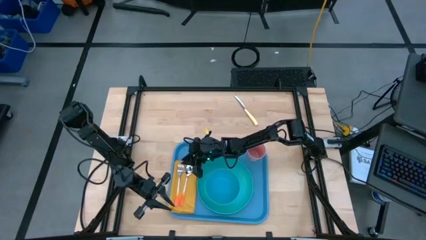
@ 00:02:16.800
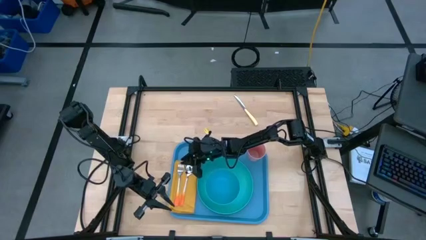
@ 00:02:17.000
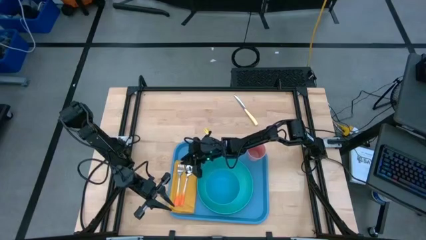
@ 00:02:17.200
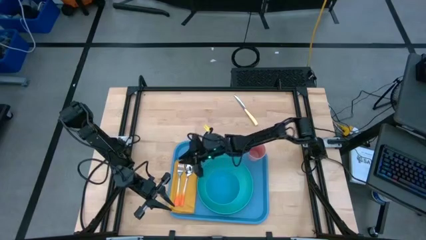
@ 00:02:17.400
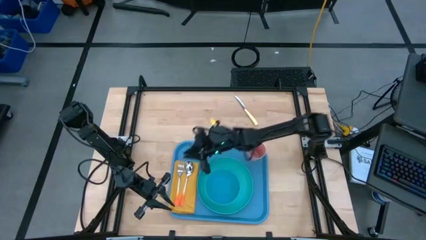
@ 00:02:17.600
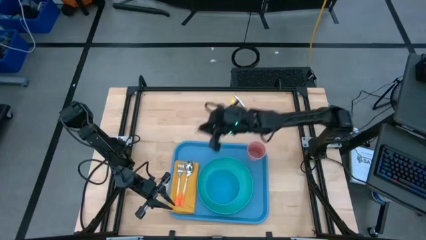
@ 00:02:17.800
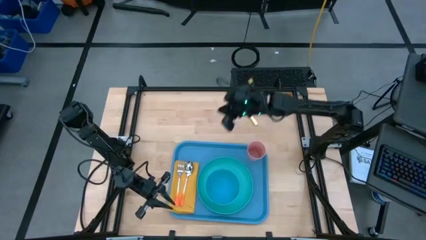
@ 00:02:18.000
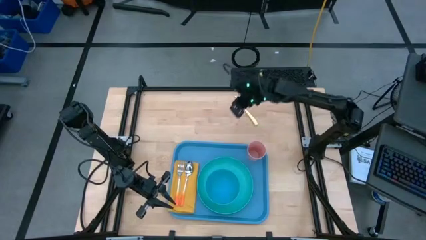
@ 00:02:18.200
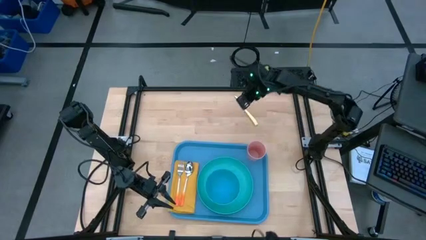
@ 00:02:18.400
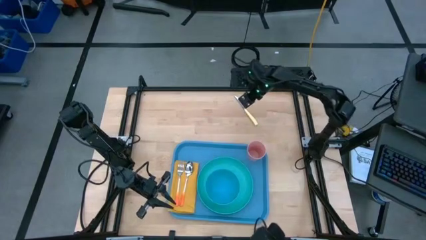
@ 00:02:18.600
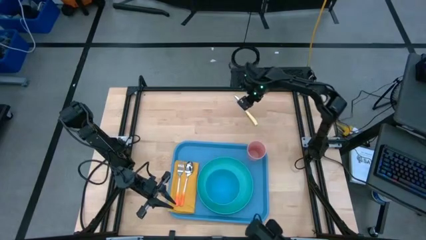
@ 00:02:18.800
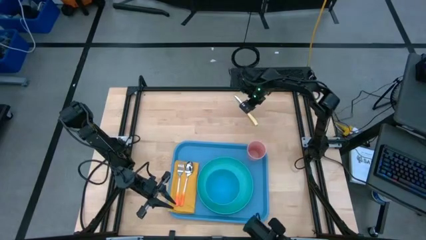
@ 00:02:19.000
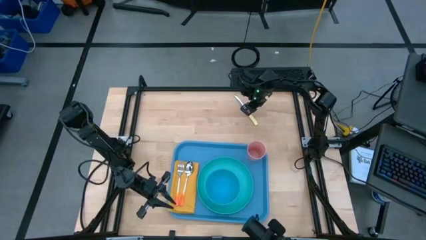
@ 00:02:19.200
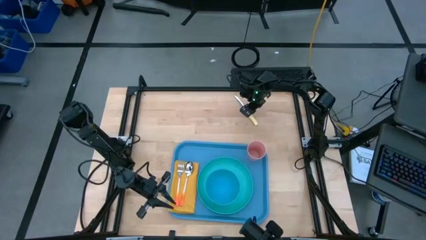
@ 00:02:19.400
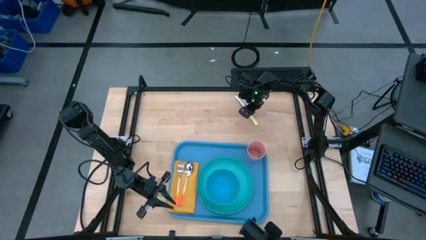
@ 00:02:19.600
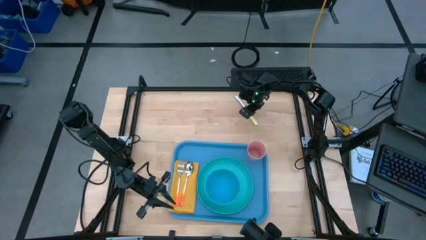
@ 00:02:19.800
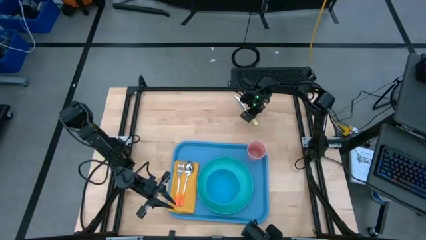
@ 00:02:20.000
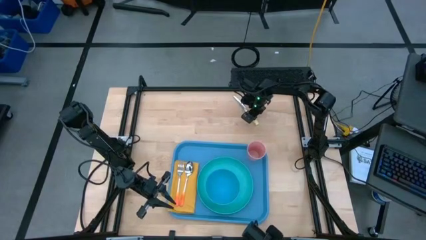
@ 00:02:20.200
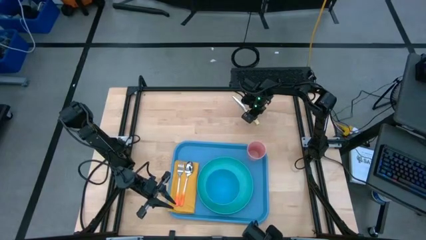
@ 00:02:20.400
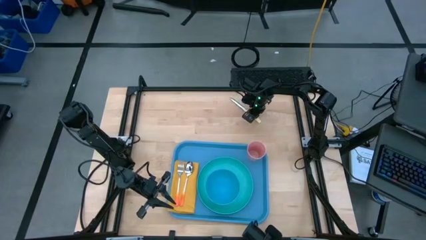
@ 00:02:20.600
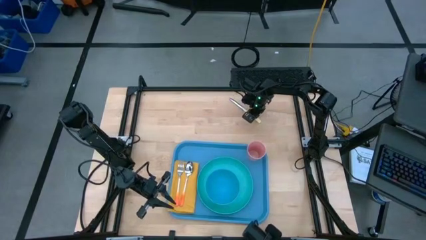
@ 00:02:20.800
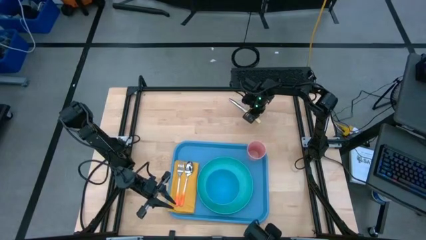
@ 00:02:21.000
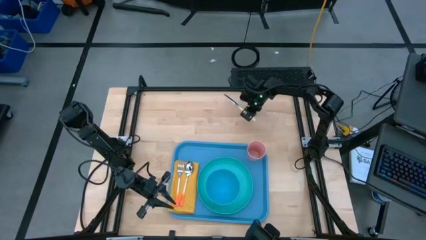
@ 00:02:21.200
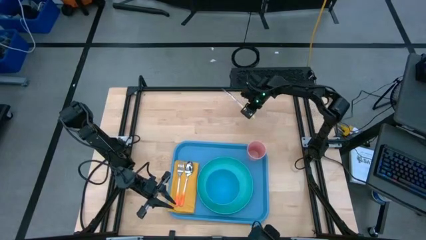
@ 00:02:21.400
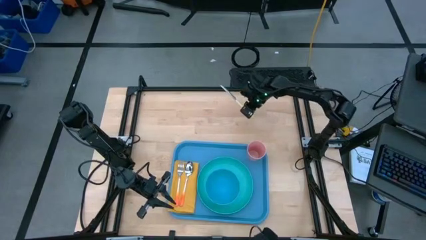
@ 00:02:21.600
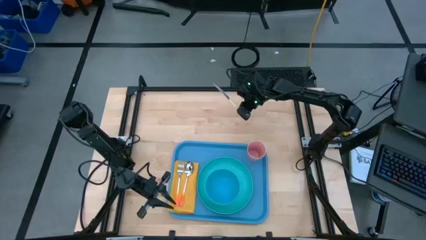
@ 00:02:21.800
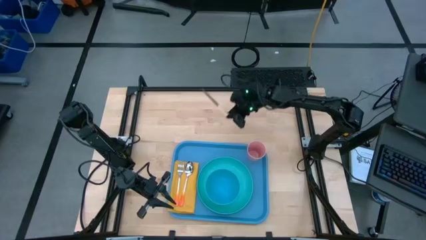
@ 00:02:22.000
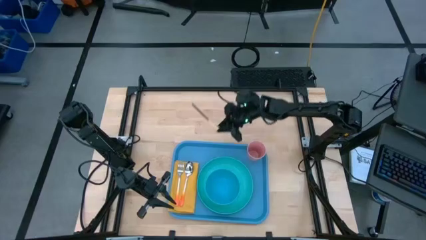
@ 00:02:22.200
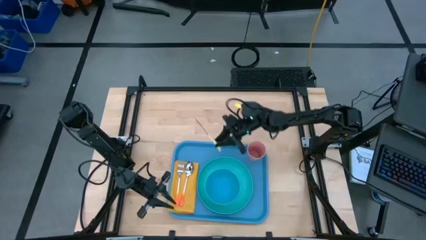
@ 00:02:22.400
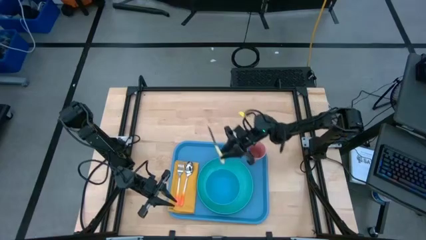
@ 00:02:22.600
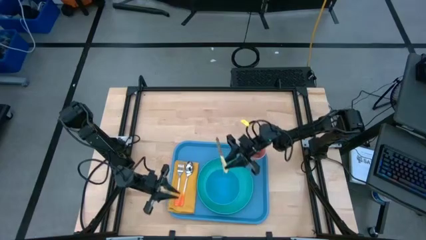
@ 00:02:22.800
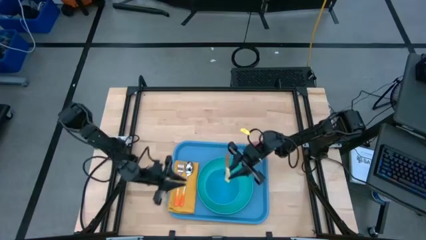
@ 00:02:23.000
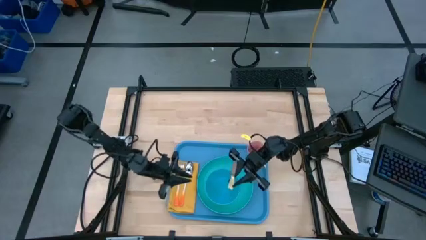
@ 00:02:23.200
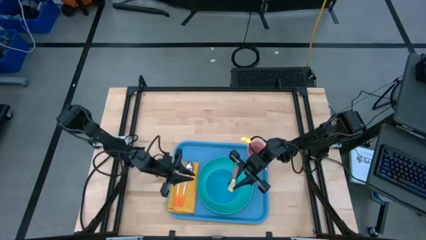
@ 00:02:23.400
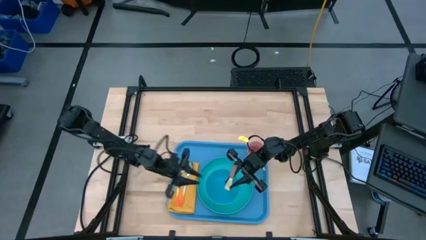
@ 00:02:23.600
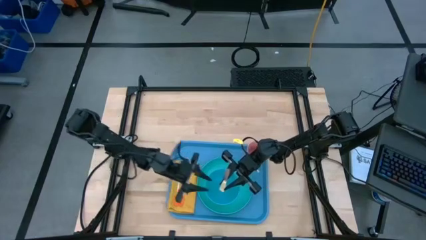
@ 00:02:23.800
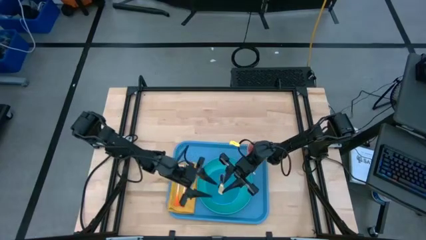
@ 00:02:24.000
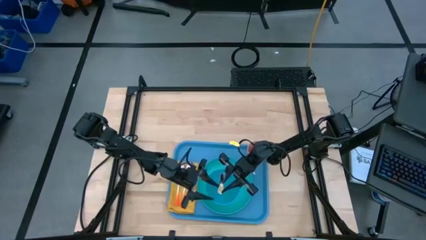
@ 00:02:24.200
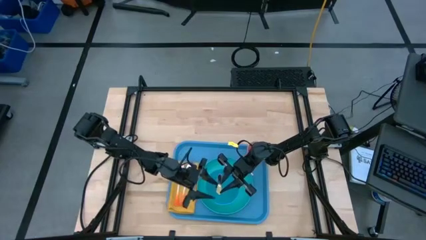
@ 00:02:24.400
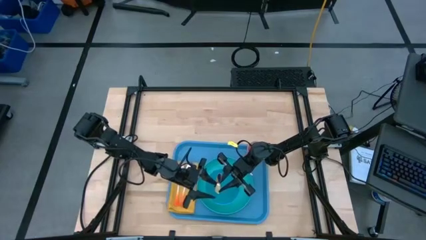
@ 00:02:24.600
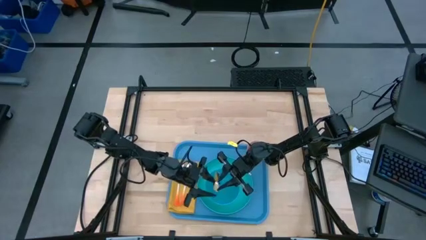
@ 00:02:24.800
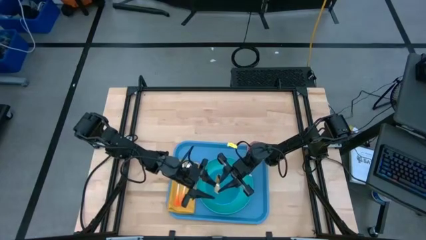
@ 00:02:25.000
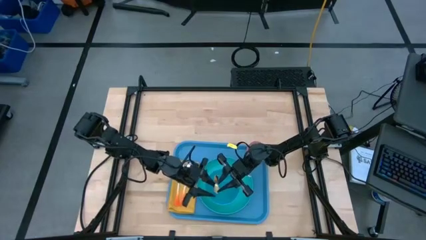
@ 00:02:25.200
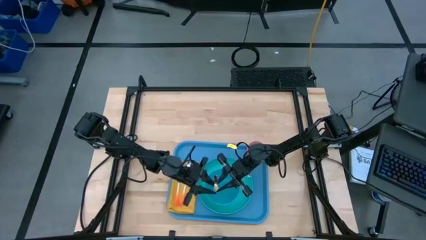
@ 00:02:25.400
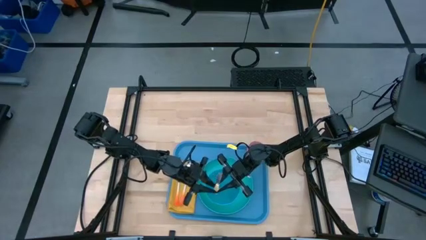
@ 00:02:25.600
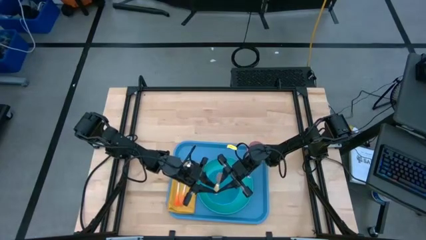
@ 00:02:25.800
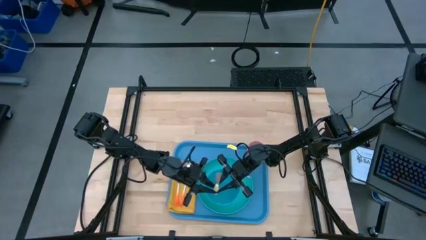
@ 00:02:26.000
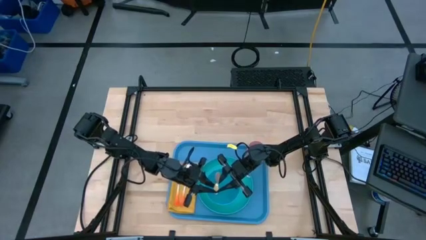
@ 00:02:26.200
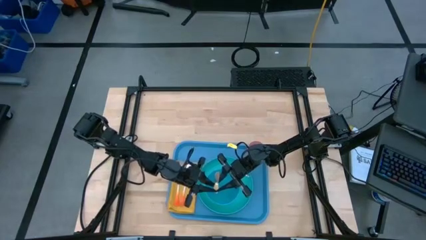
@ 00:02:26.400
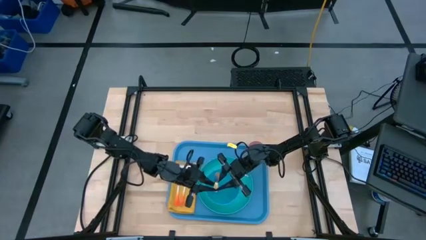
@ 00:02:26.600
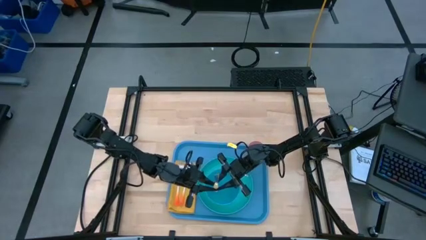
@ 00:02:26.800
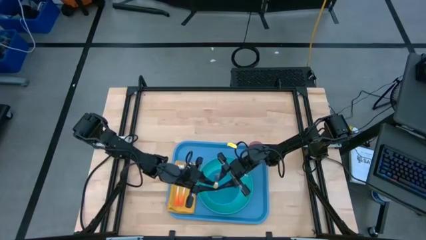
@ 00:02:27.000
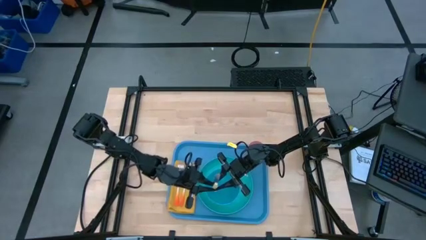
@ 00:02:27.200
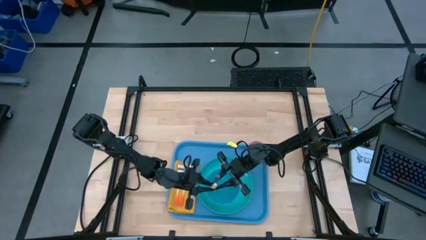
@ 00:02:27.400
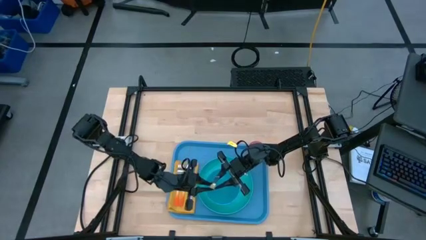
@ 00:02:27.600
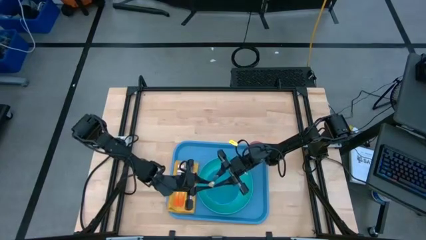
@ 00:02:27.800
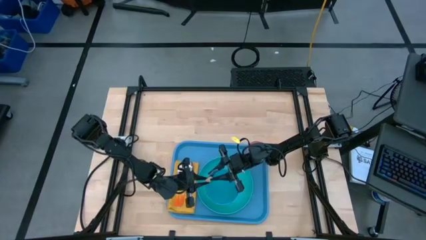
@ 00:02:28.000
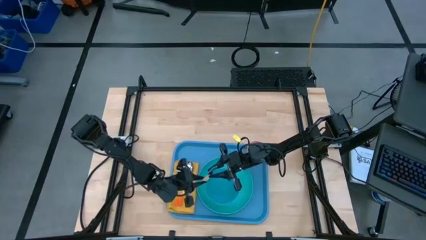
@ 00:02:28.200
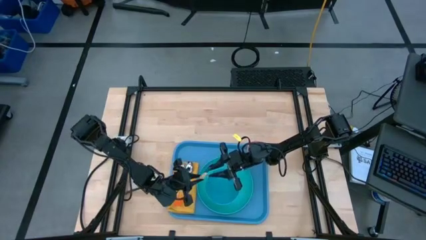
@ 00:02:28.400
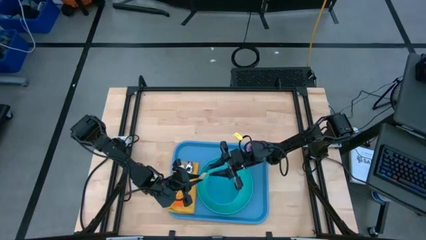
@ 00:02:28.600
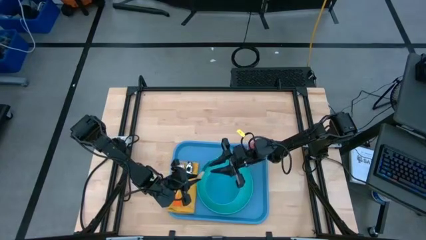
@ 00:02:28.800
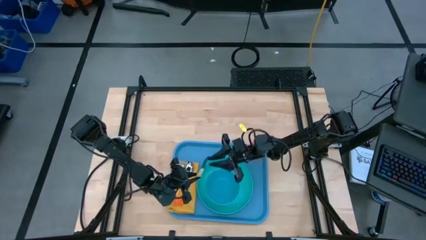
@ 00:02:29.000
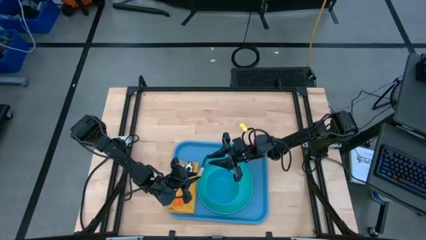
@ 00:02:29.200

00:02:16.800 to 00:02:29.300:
Task: Set up tray
Put the yellow table knife on top of the yellow table napkin to the right of the orange spoon
